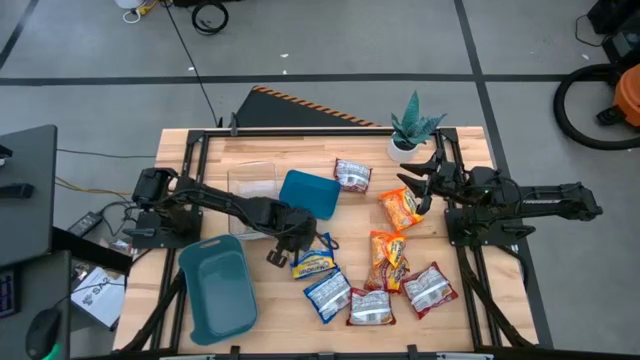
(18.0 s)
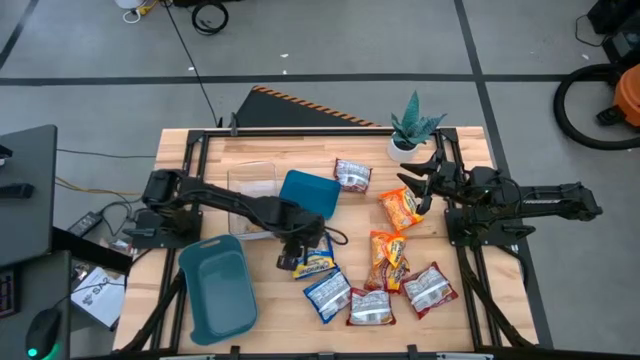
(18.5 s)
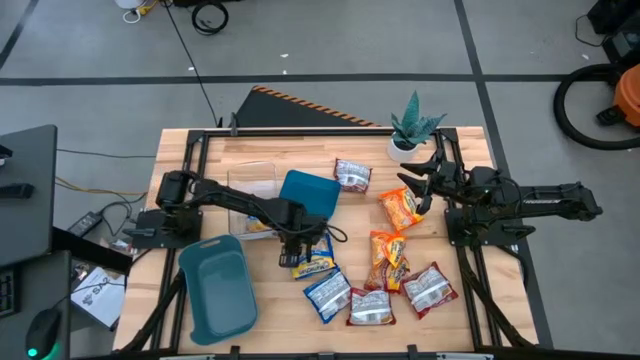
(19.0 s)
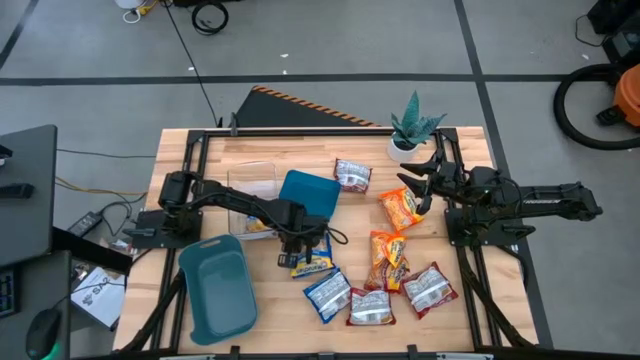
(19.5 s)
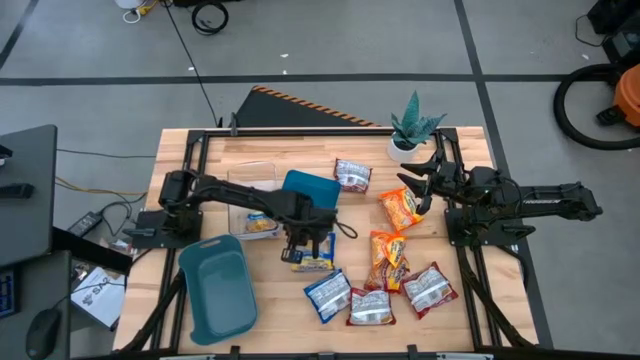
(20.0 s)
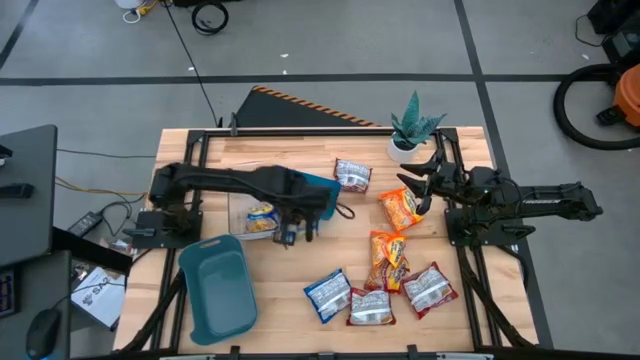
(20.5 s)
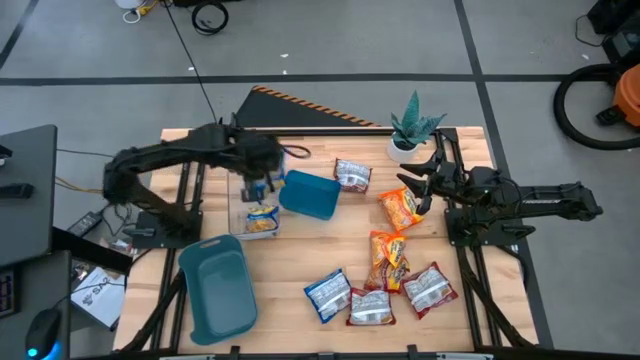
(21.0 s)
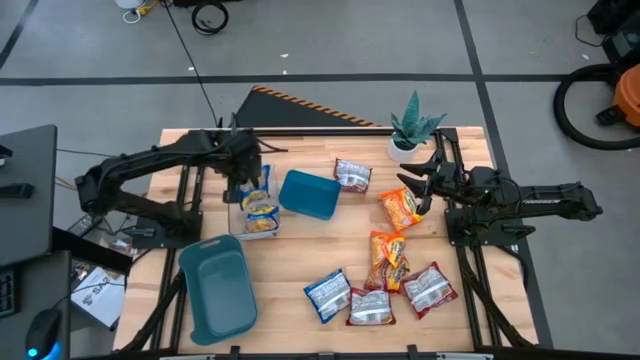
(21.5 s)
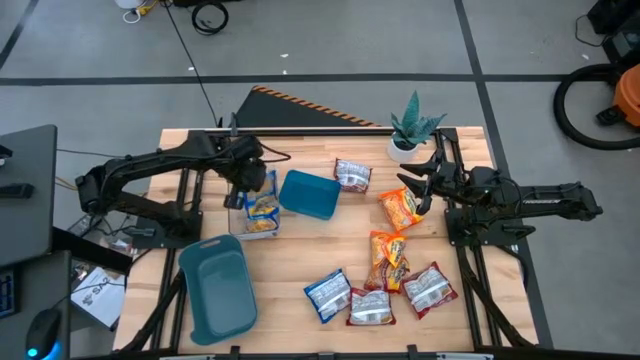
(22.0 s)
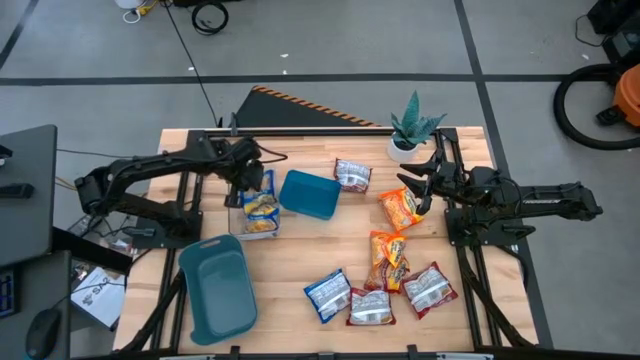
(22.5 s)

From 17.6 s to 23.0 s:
Task: Sort Maruchan noodles
Put the top blue noodle pack into the transparent bin

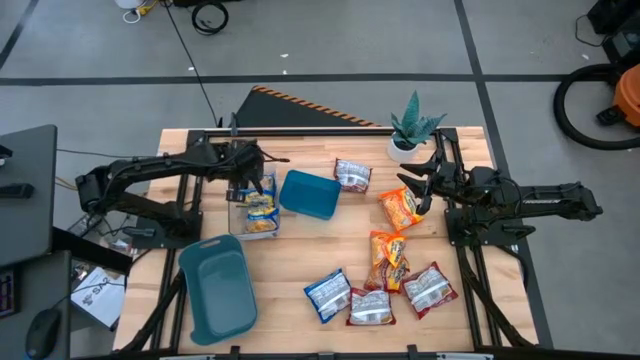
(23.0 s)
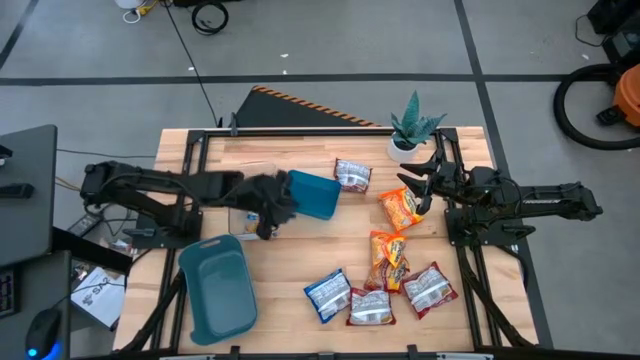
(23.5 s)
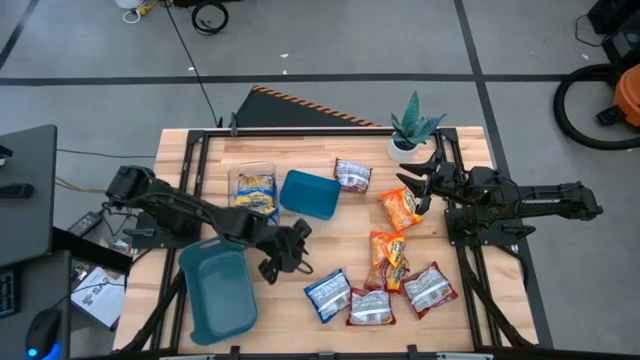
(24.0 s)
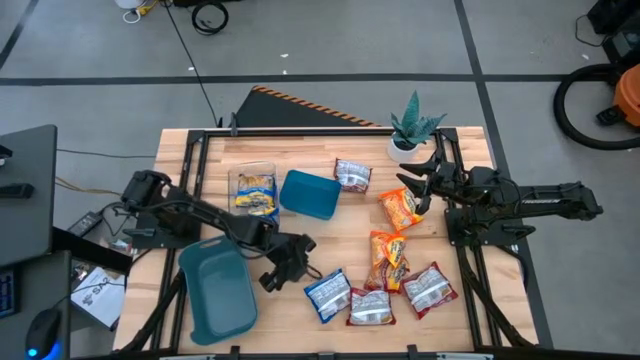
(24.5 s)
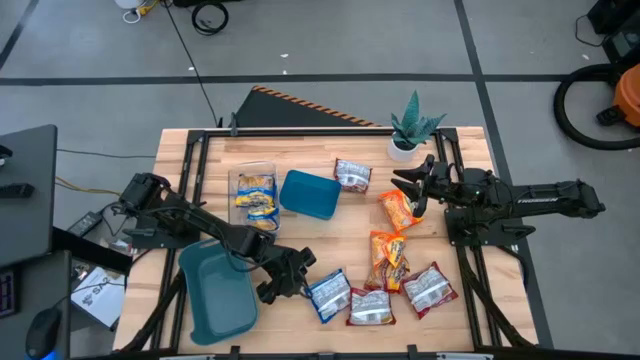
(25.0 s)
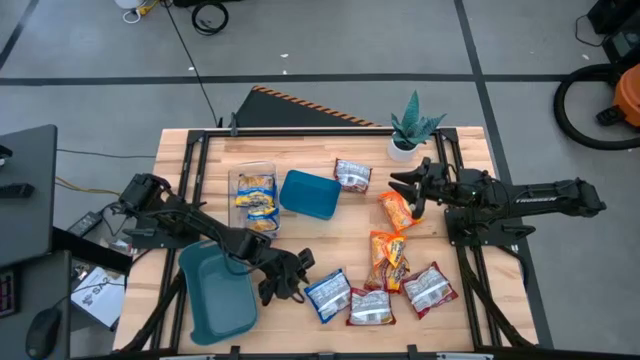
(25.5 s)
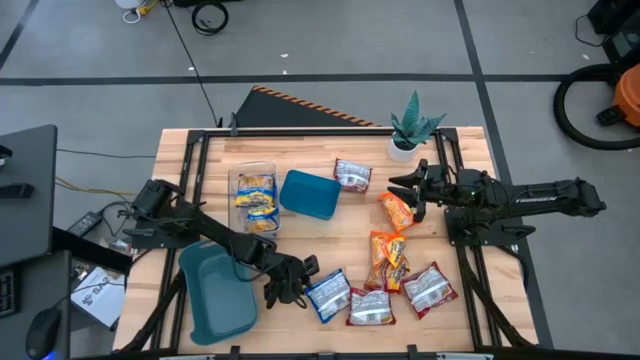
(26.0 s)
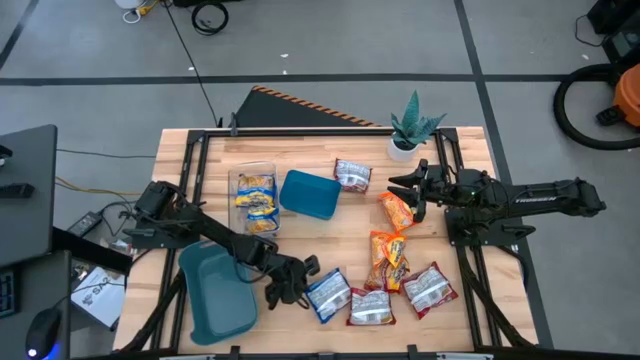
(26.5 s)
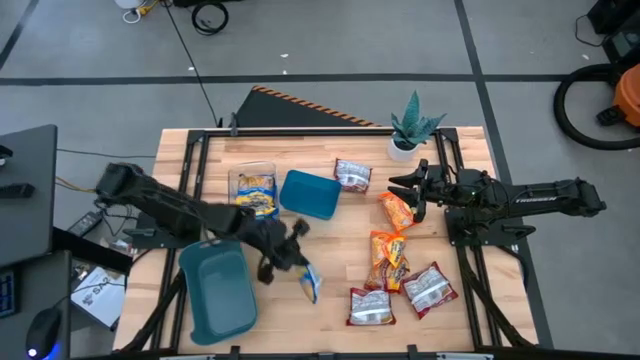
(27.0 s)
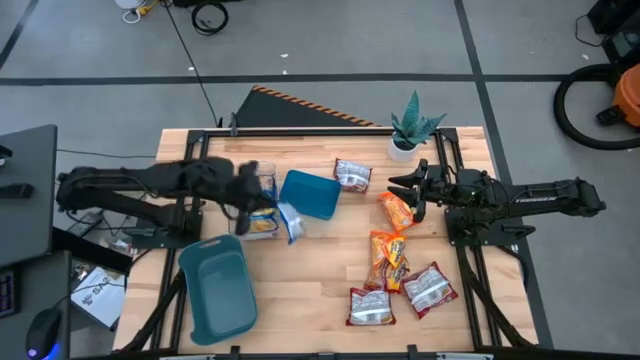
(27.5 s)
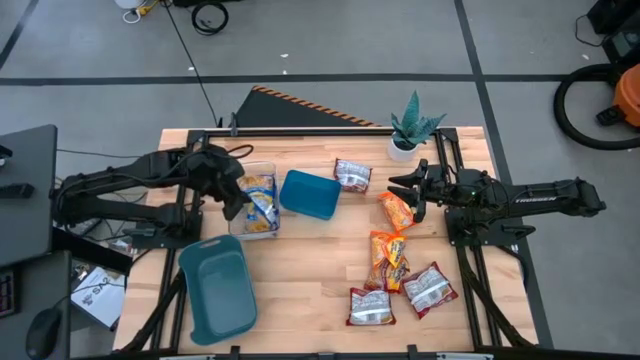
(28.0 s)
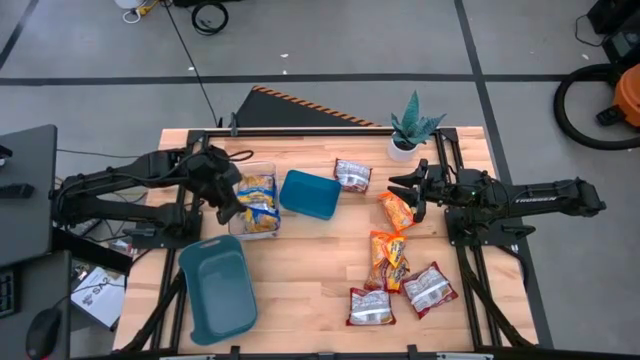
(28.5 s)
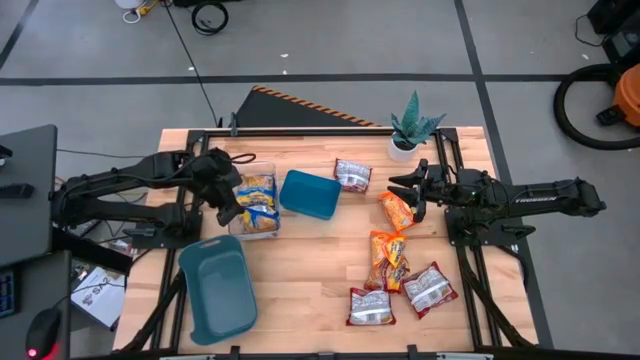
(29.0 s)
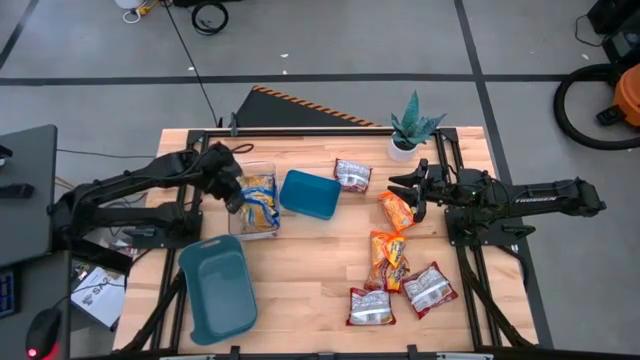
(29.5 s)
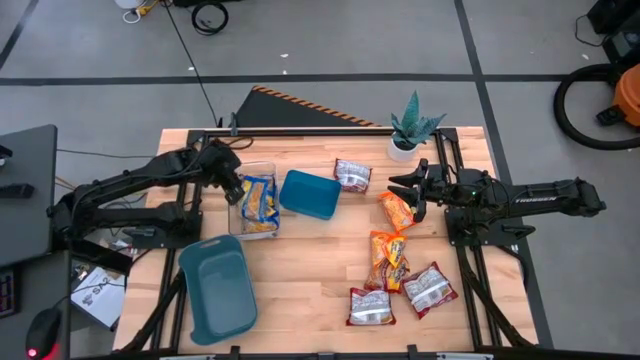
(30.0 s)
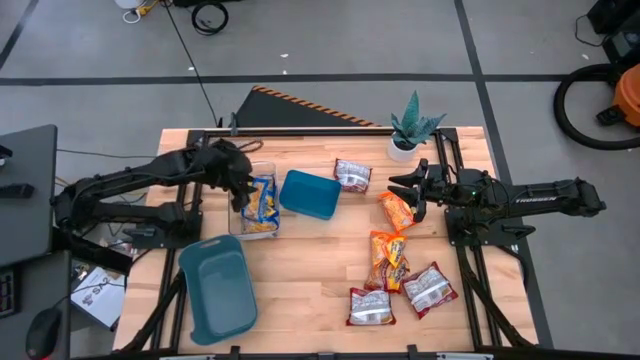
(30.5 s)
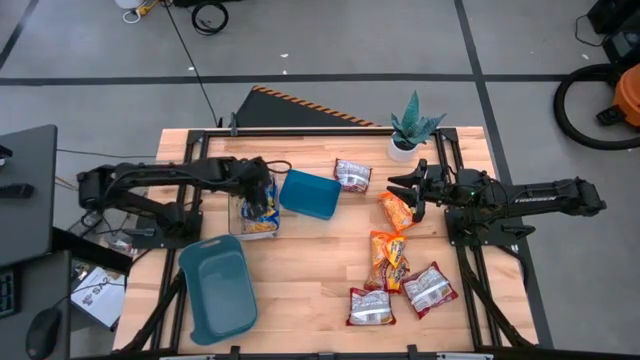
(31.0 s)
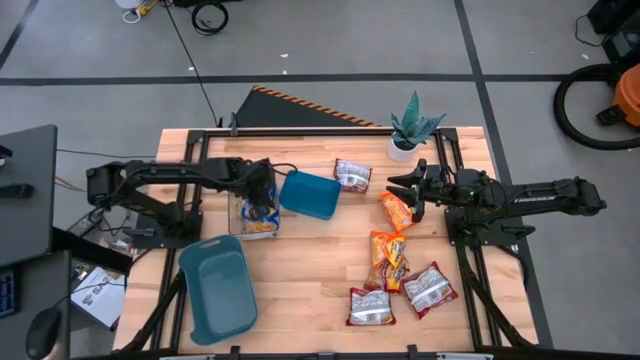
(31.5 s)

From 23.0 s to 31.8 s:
Put the blue noodle pack into the transparent bin

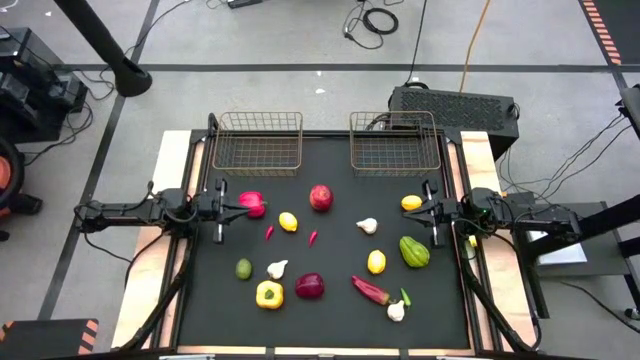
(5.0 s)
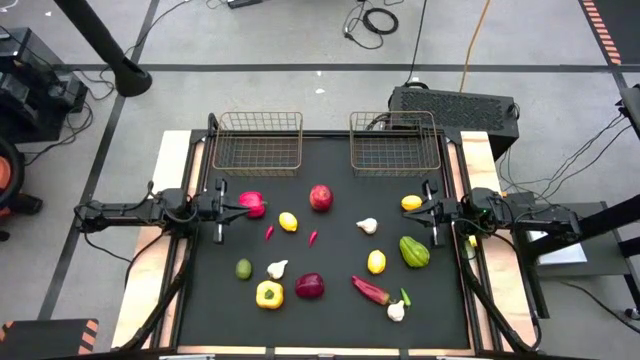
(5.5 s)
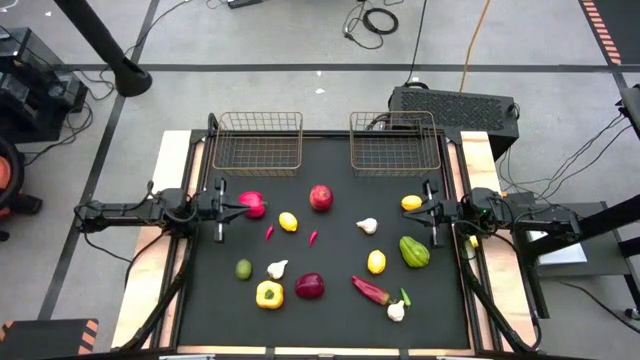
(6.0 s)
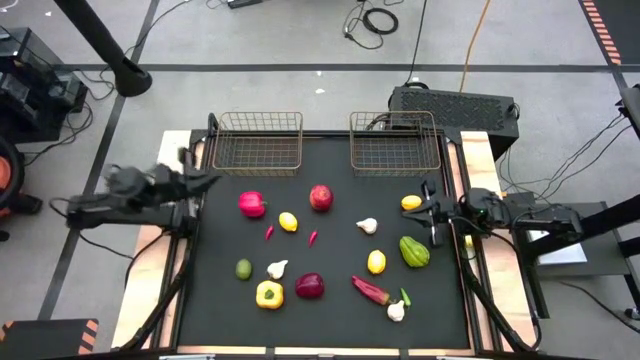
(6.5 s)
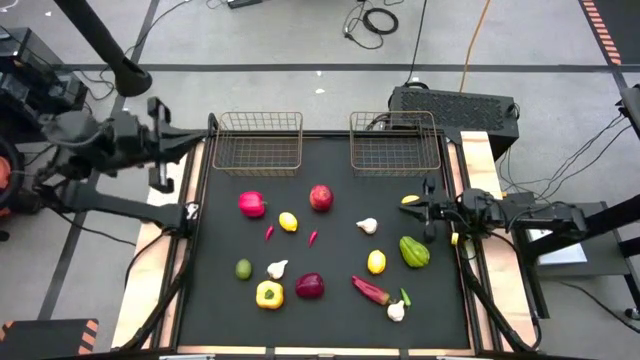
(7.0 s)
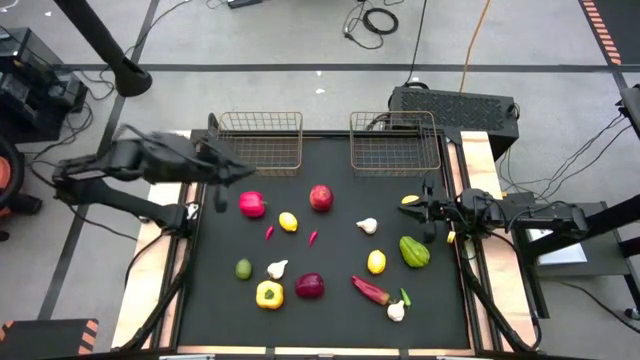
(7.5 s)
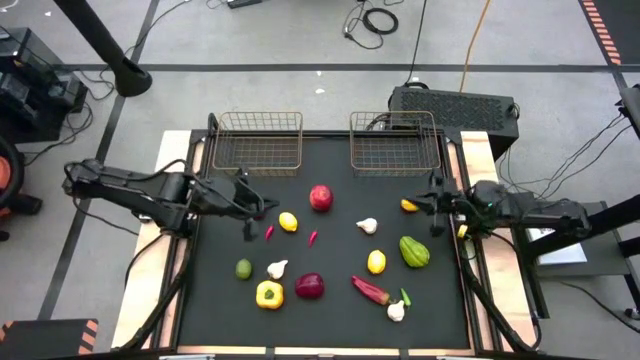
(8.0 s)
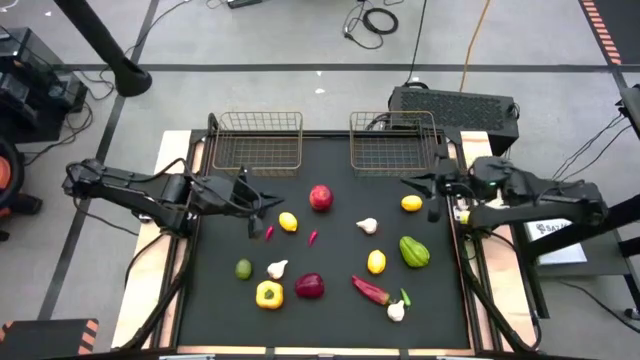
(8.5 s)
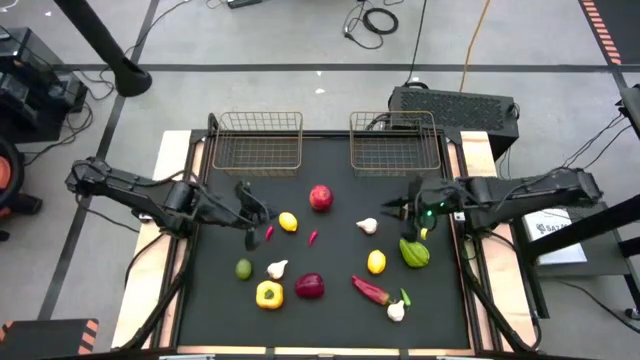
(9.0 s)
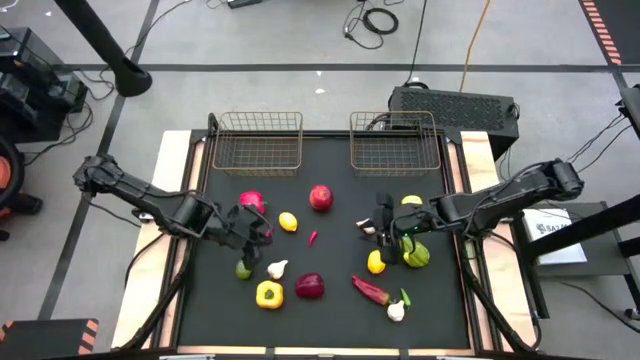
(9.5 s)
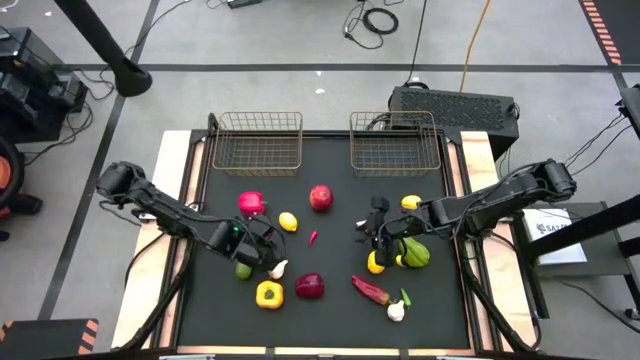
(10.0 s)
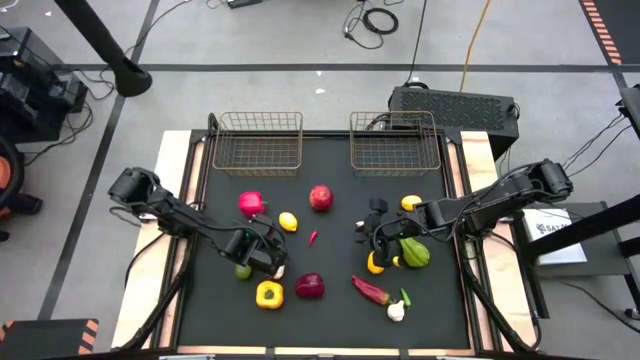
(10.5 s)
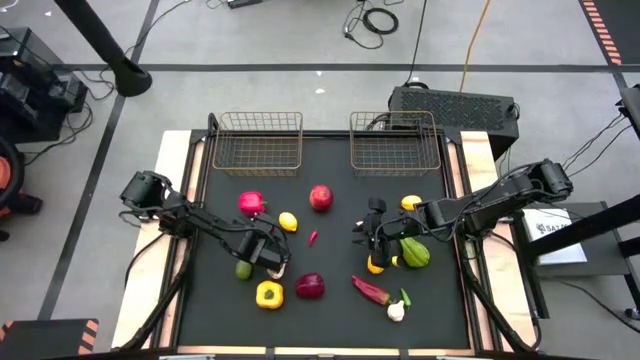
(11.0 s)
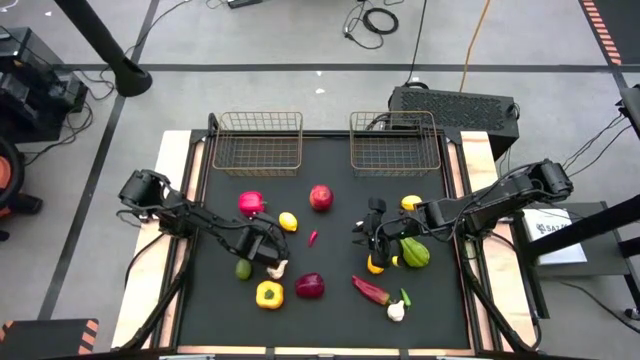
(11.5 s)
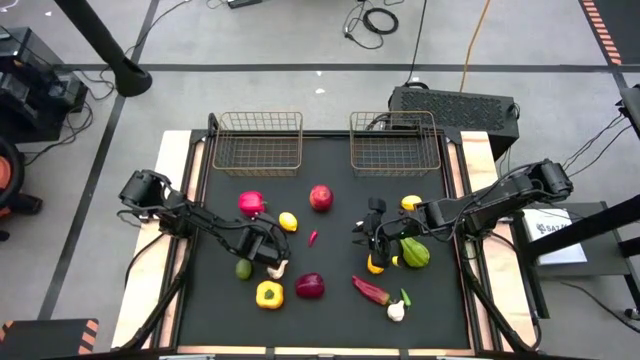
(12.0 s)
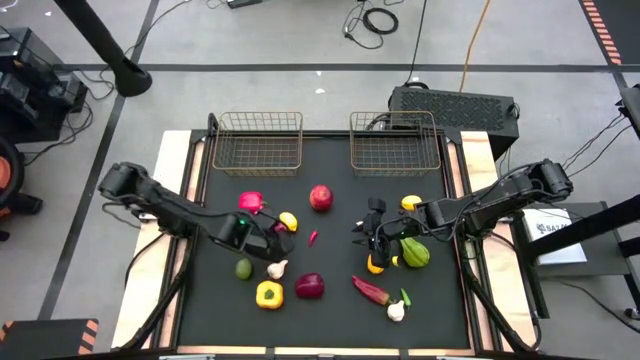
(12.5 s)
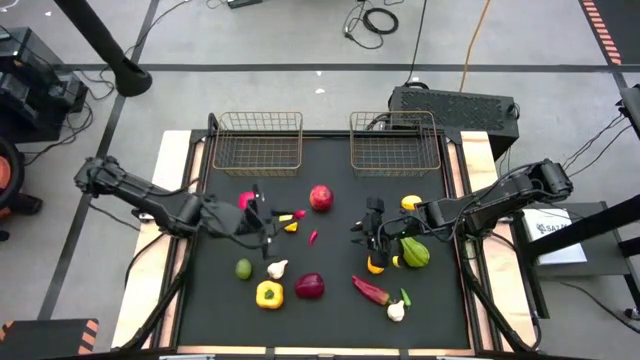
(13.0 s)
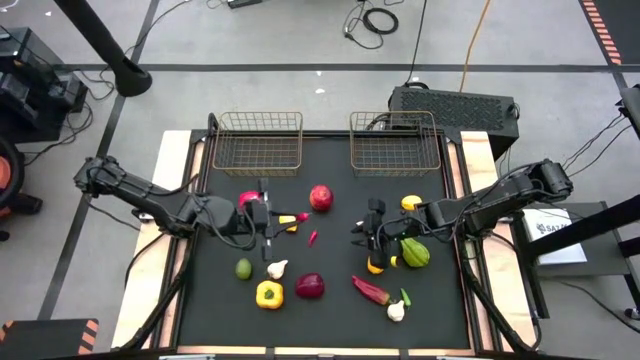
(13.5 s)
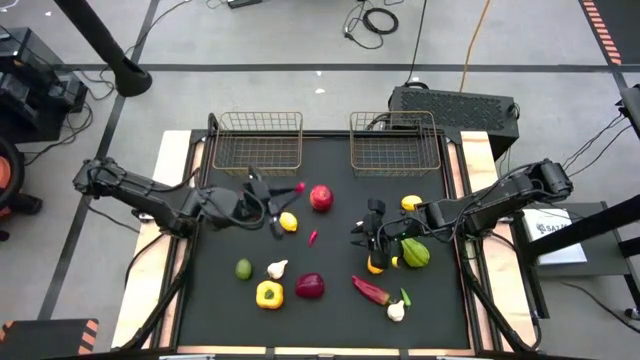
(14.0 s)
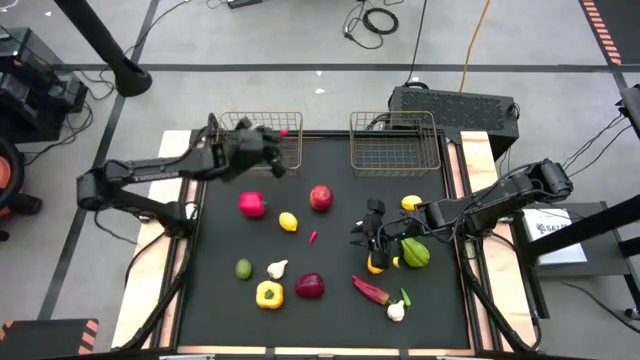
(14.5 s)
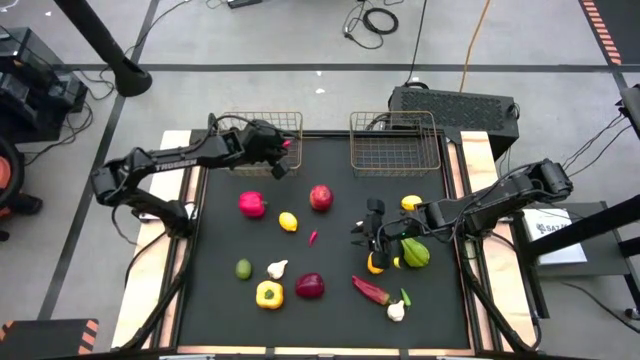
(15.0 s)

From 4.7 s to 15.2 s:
Task: Sort produce into baskets
Put the red chili pepper into the left wire basket
